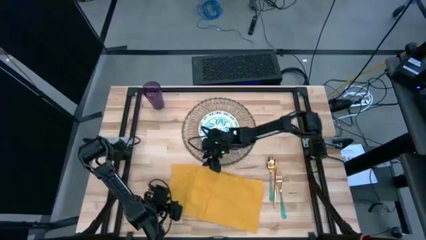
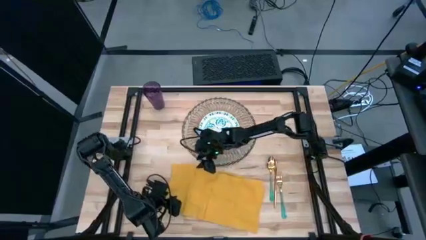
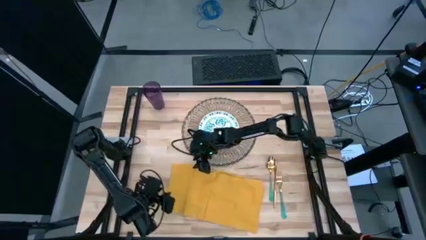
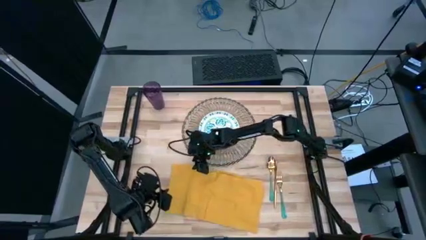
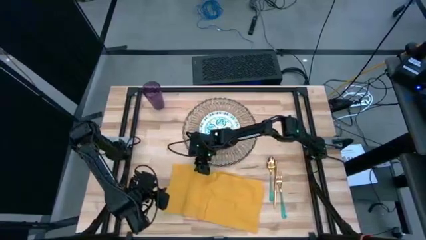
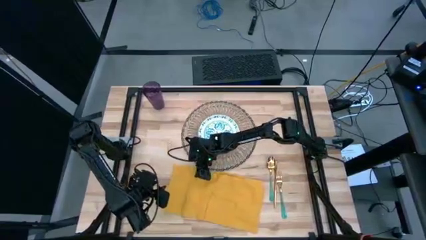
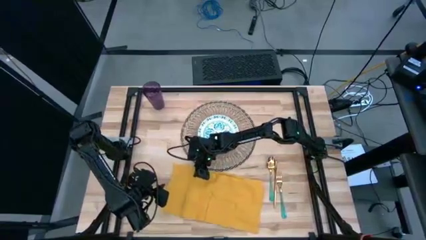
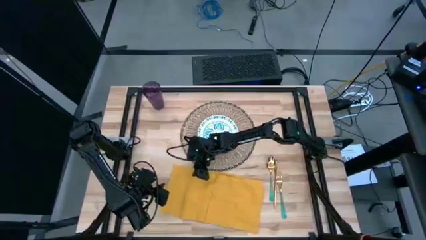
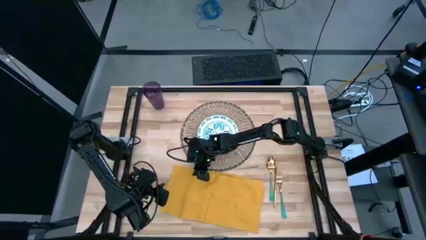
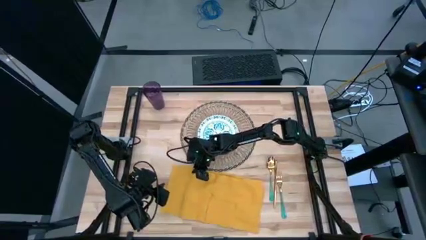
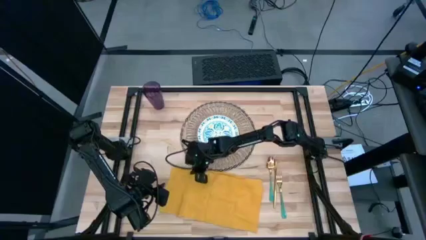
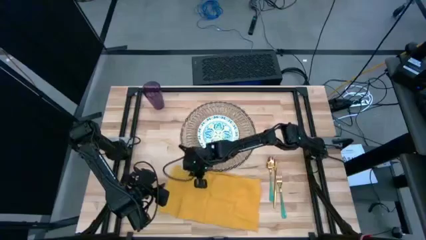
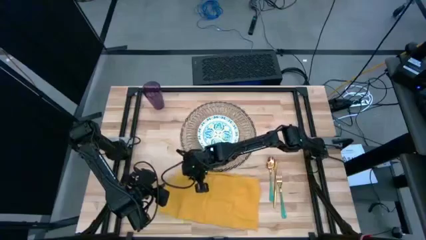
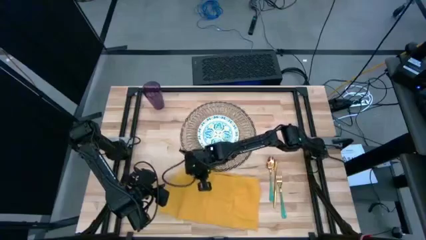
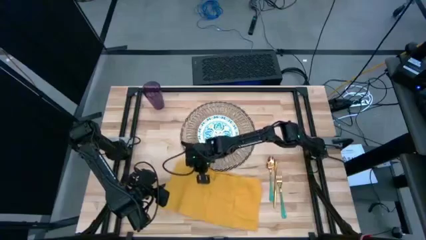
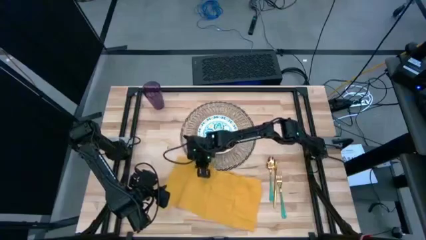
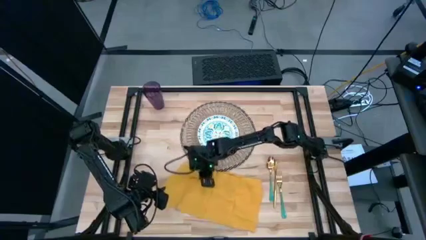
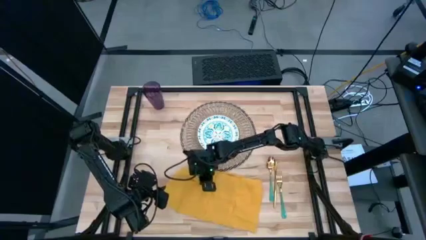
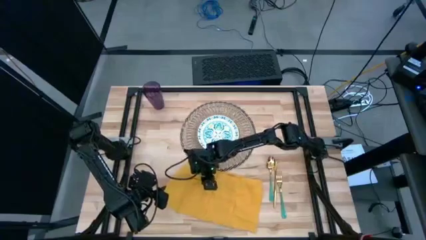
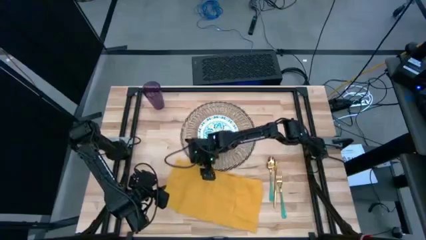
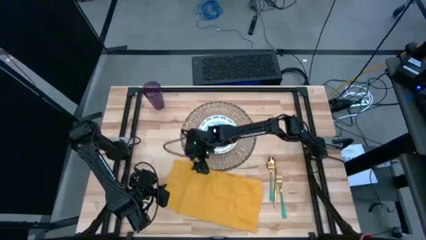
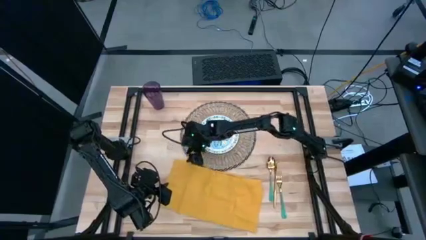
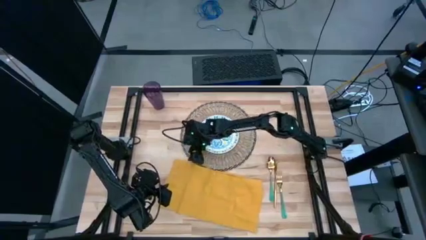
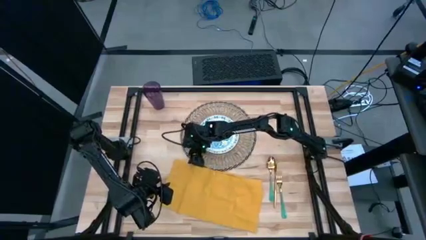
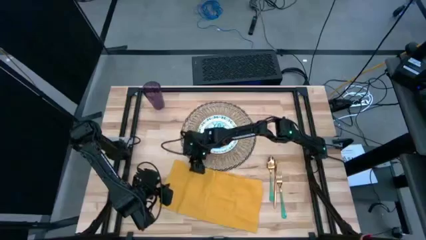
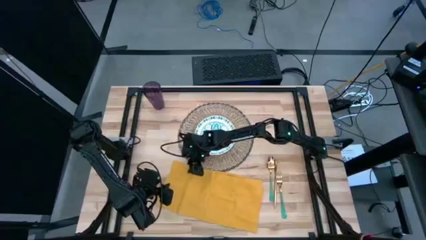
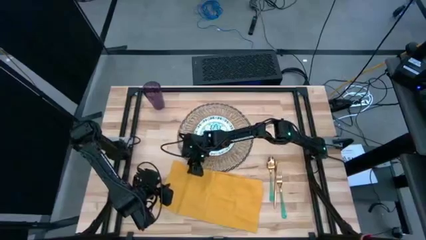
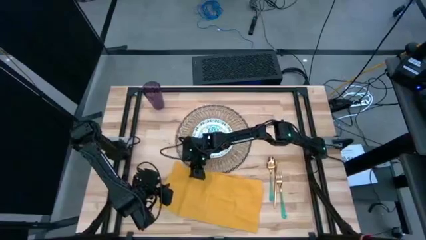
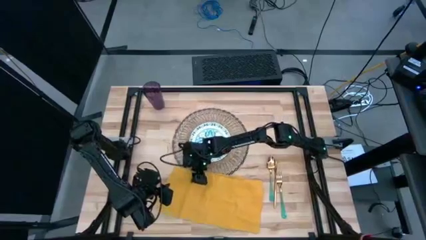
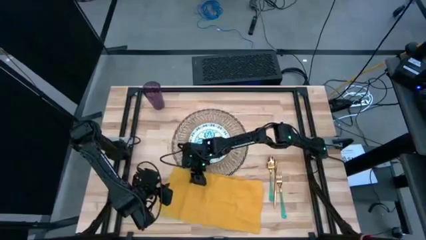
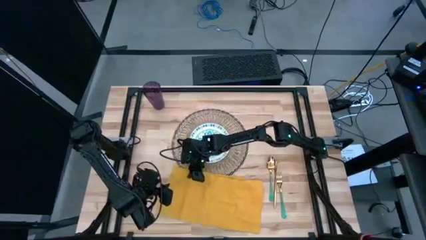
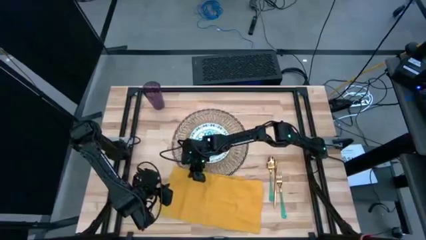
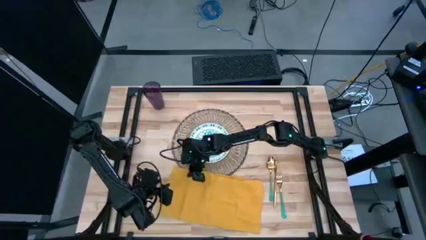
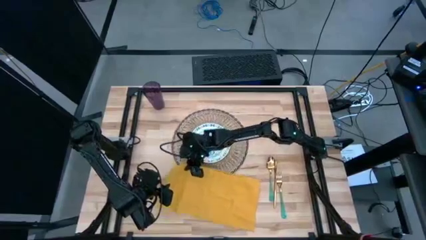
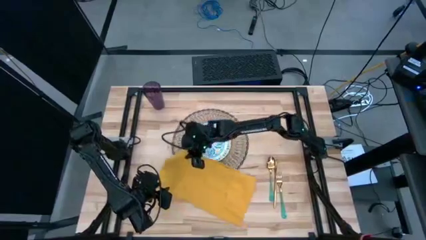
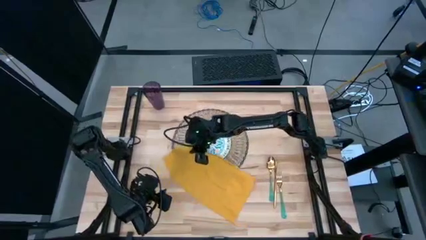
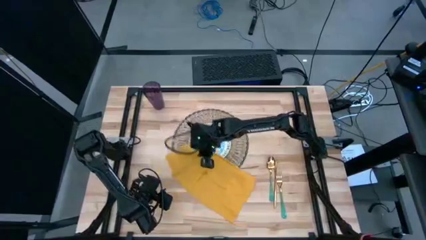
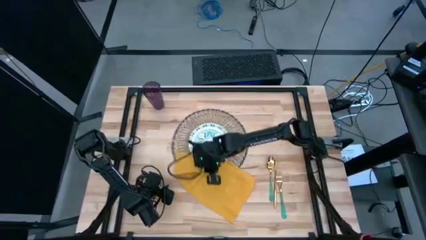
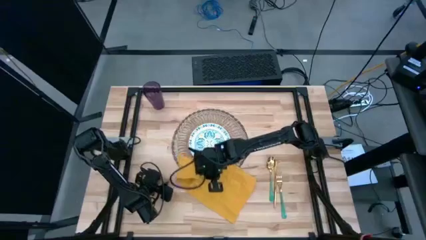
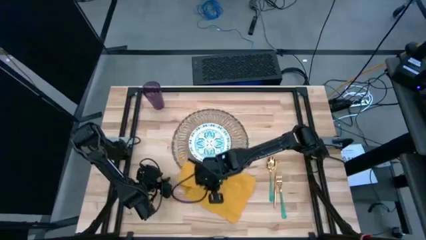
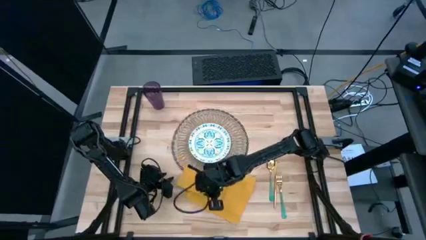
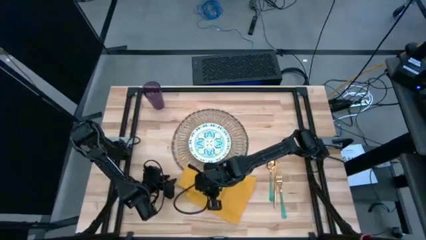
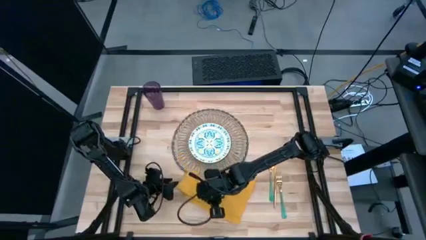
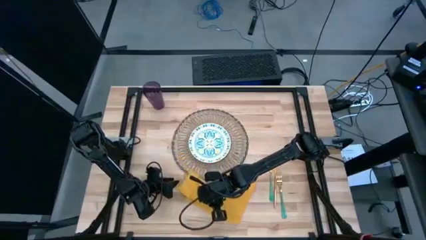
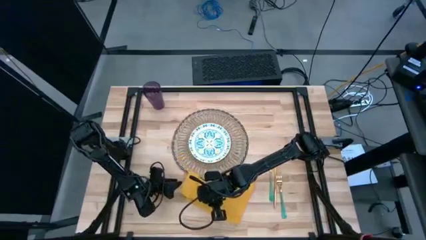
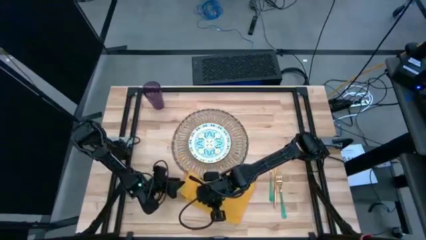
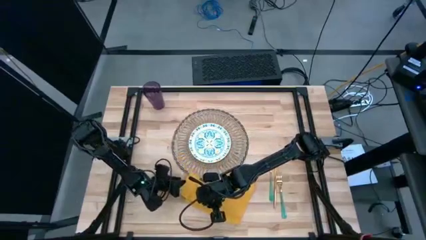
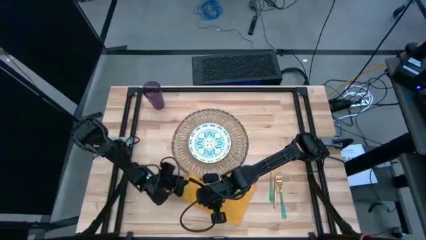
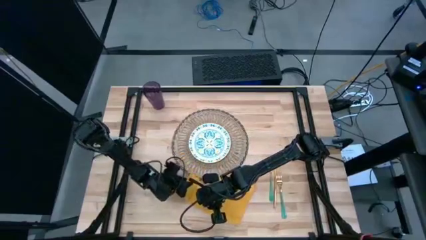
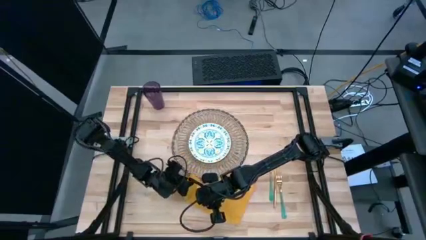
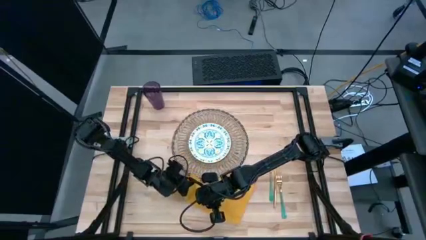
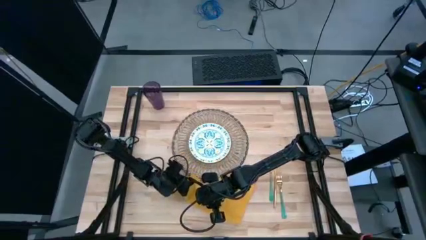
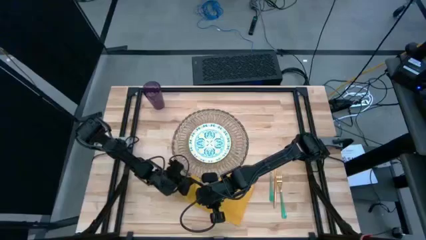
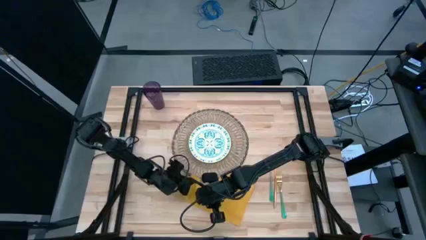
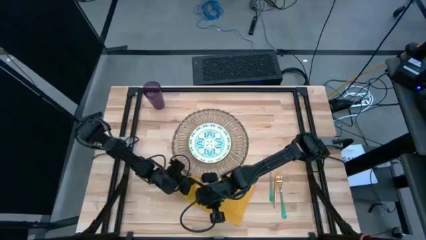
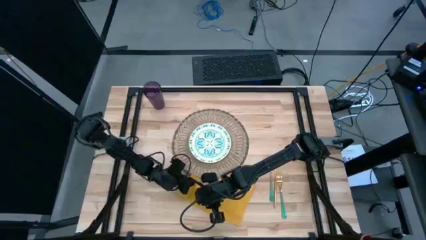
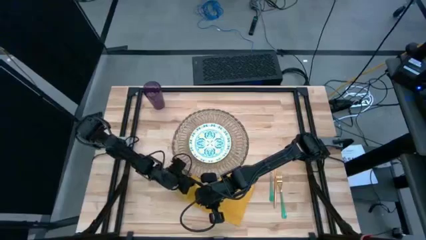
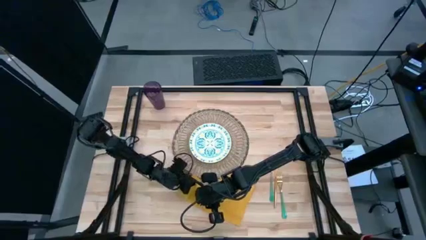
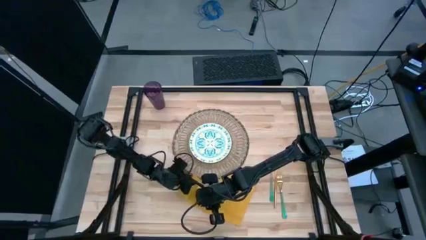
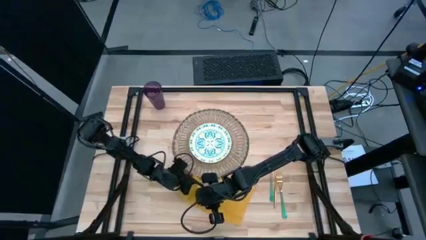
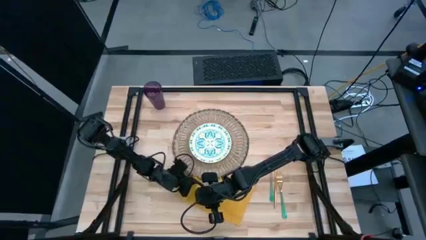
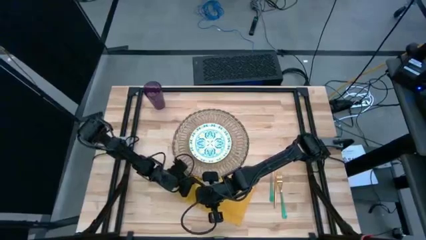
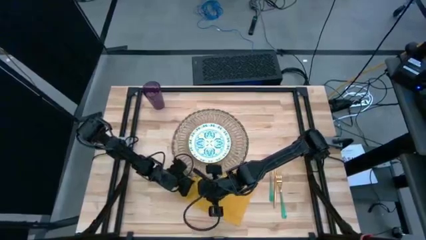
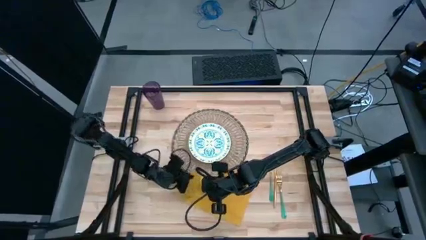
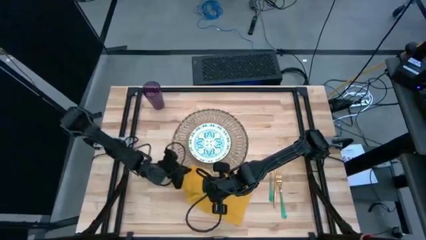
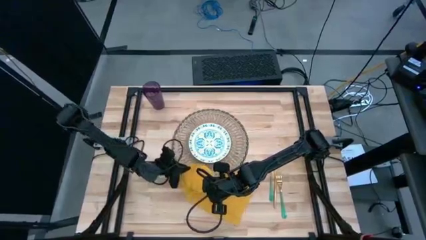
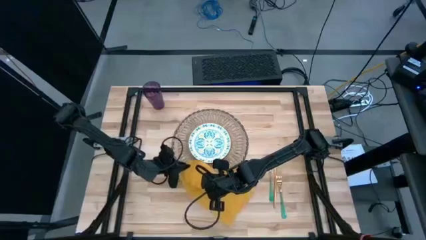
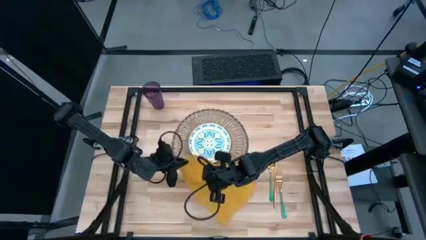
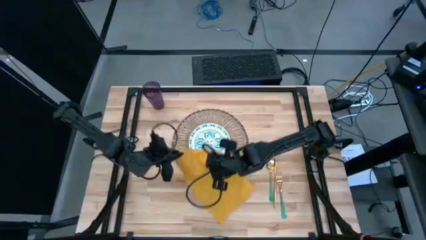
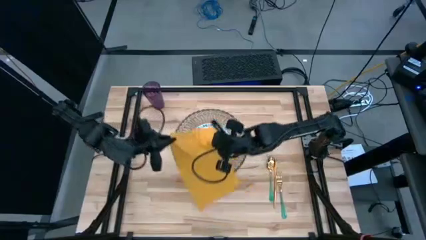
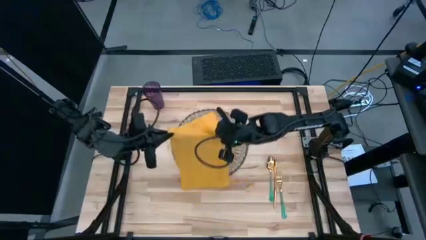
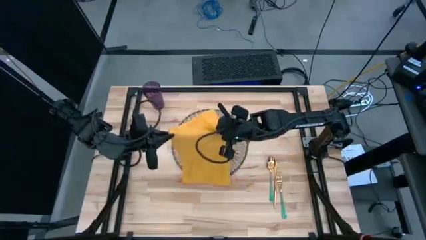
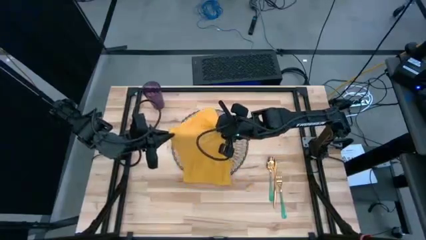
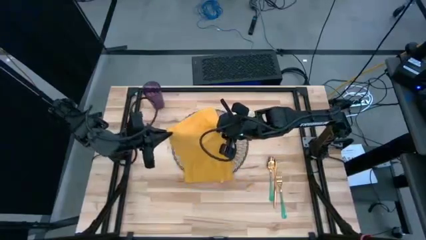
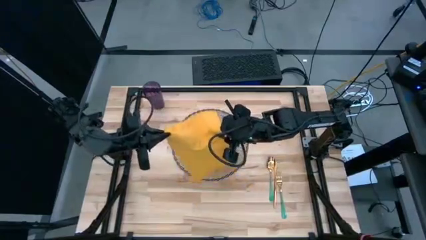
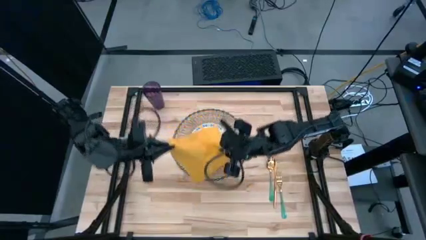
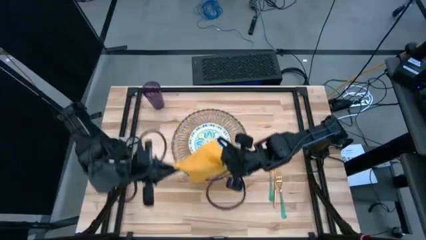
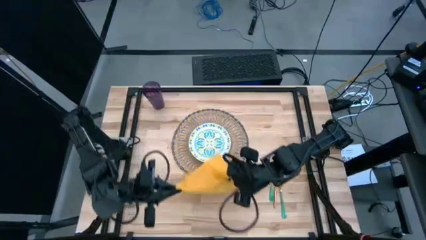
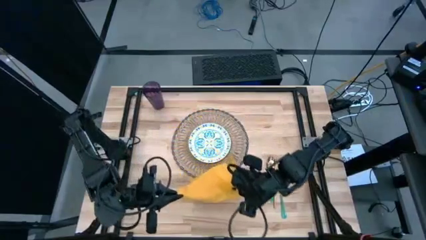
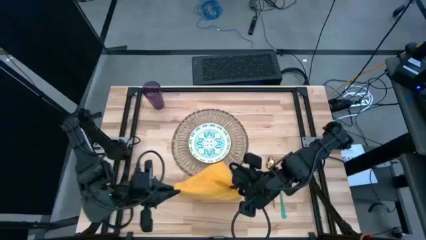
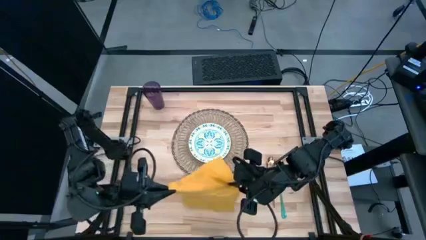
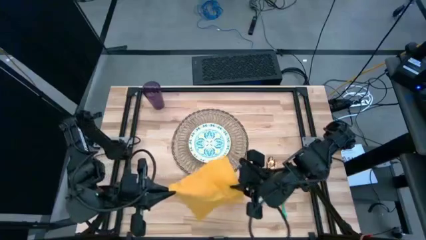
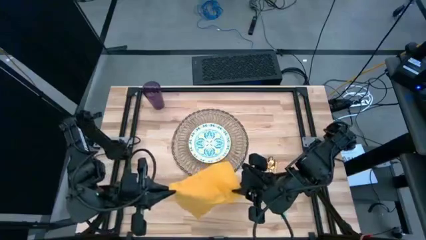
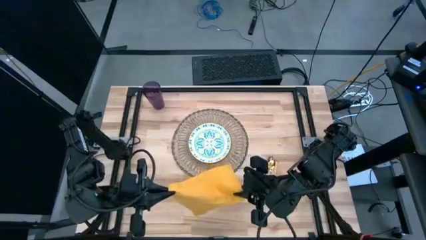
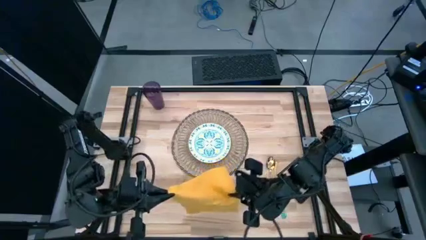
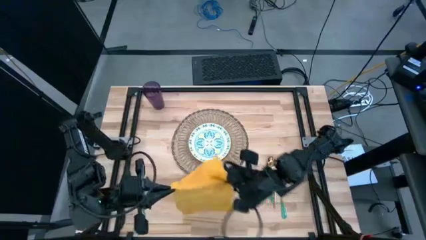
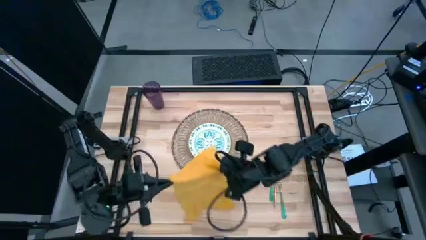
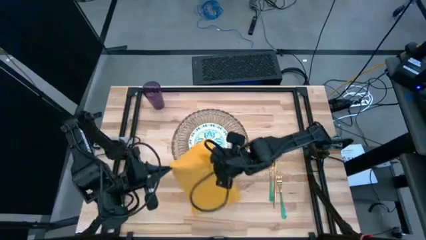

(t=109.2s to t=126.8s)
Task: Set table place
Fold the yellow table napkin
